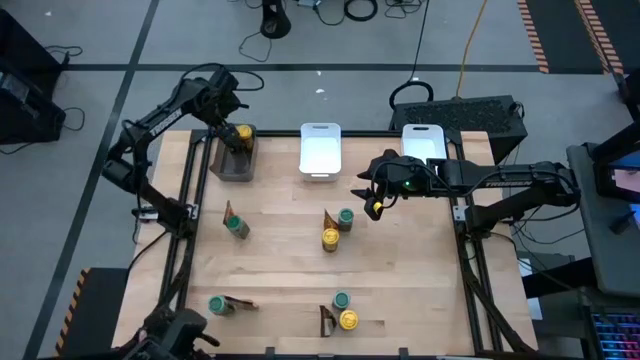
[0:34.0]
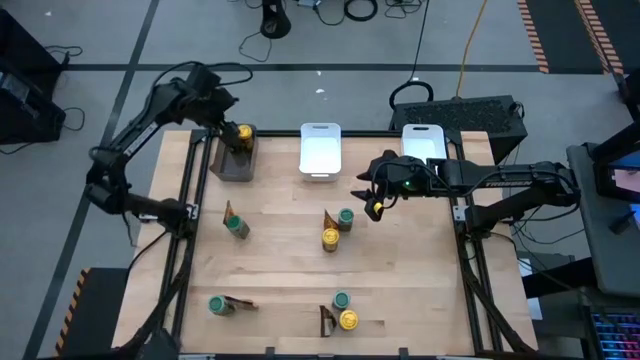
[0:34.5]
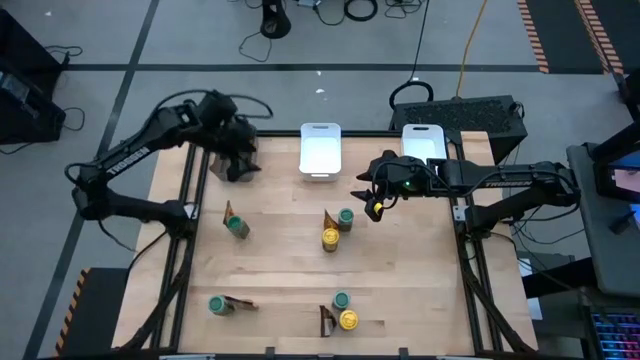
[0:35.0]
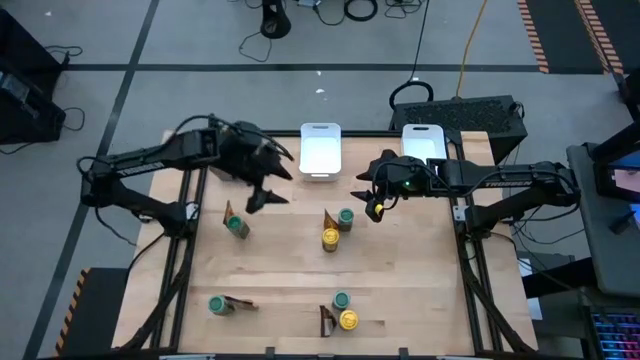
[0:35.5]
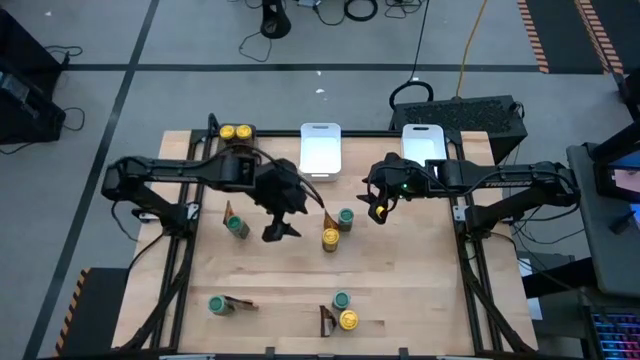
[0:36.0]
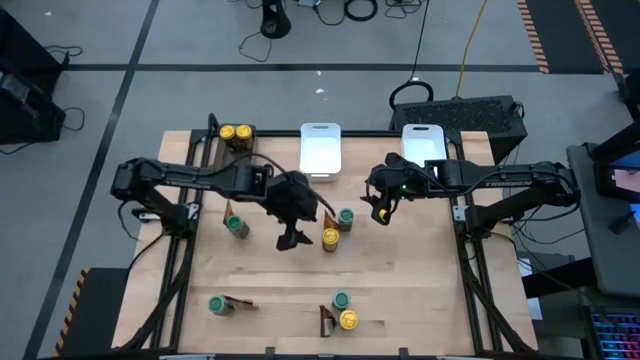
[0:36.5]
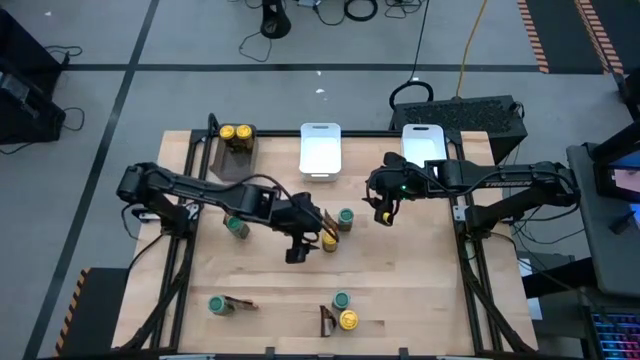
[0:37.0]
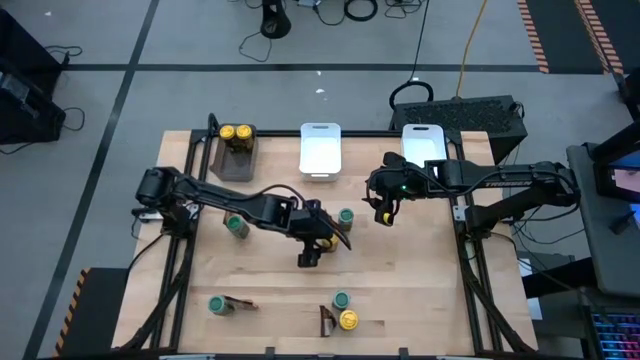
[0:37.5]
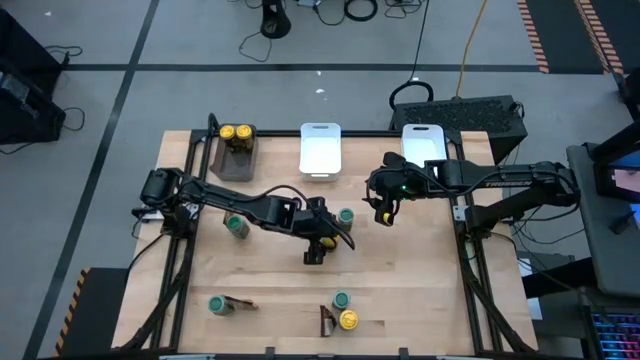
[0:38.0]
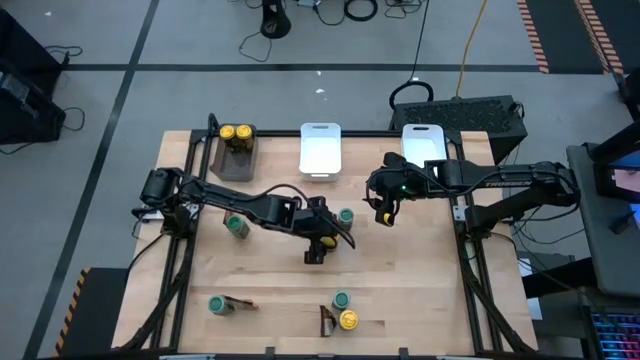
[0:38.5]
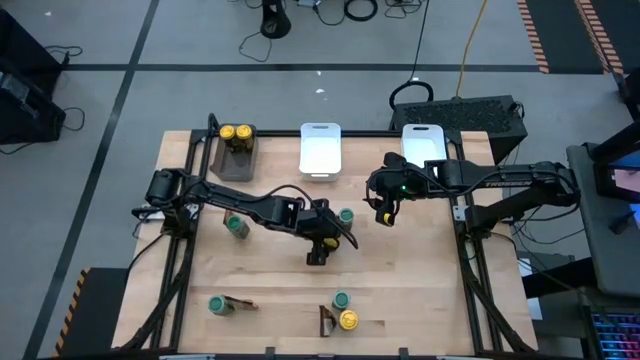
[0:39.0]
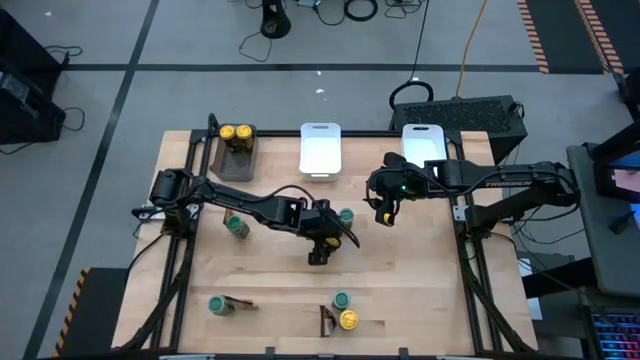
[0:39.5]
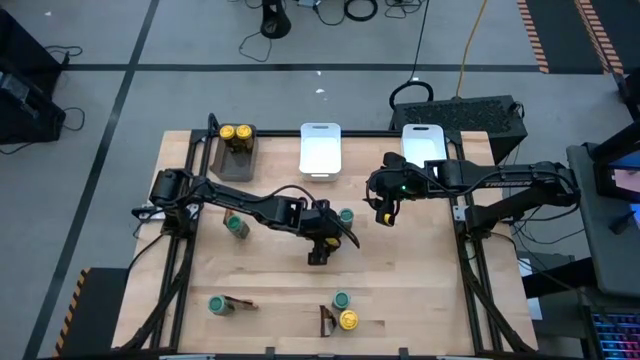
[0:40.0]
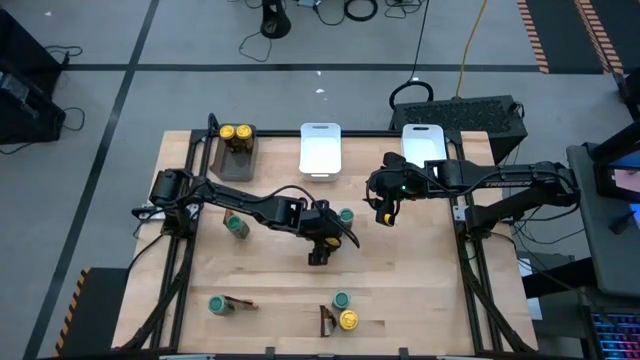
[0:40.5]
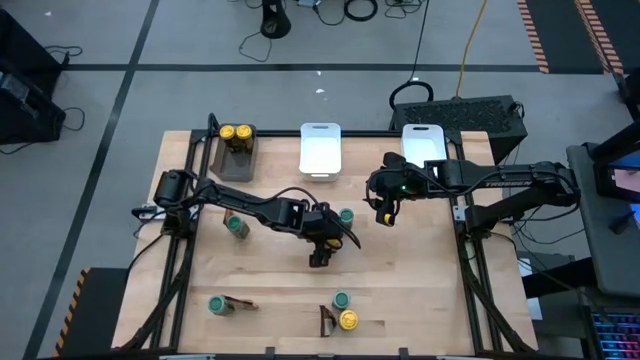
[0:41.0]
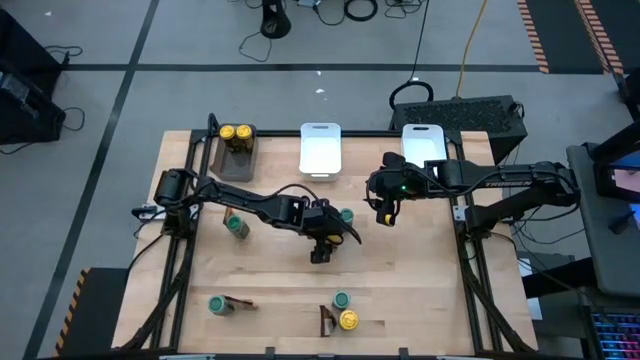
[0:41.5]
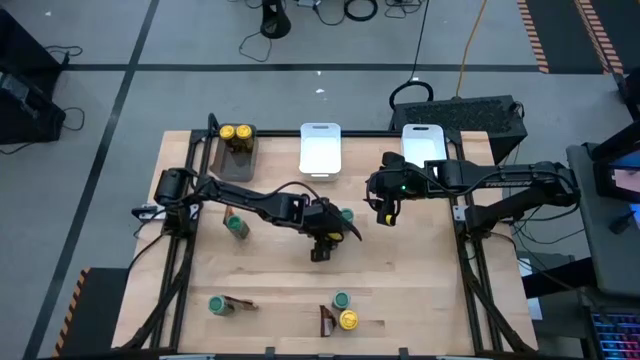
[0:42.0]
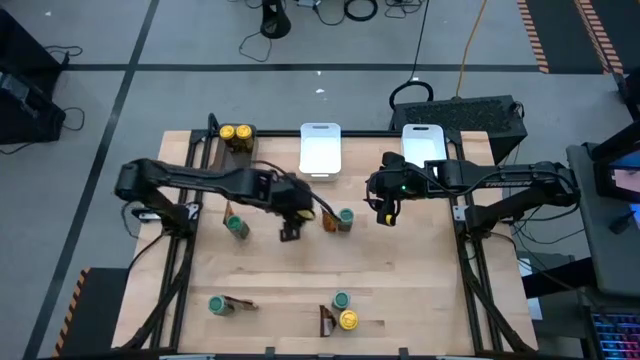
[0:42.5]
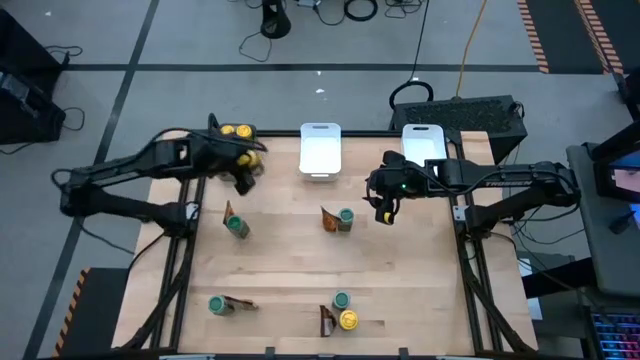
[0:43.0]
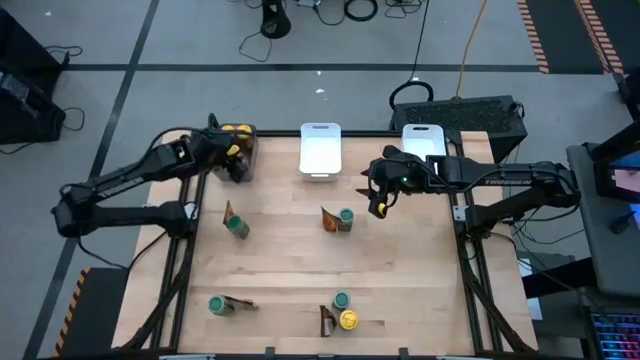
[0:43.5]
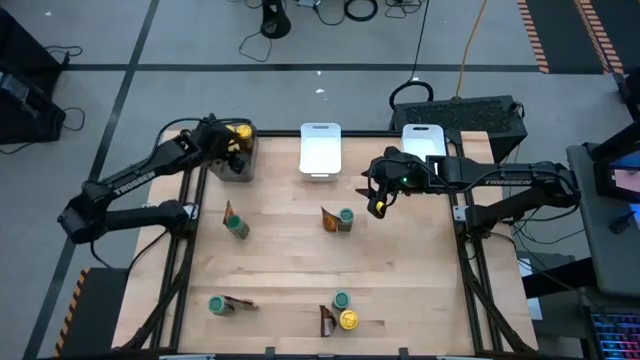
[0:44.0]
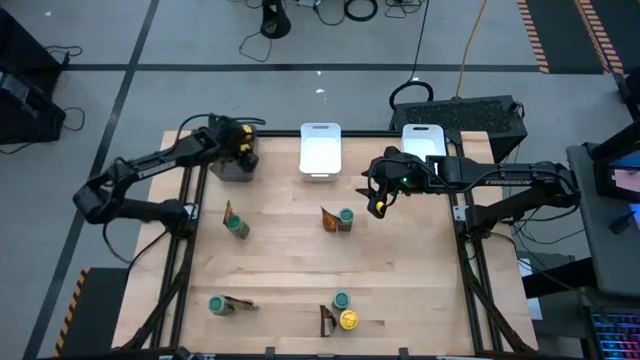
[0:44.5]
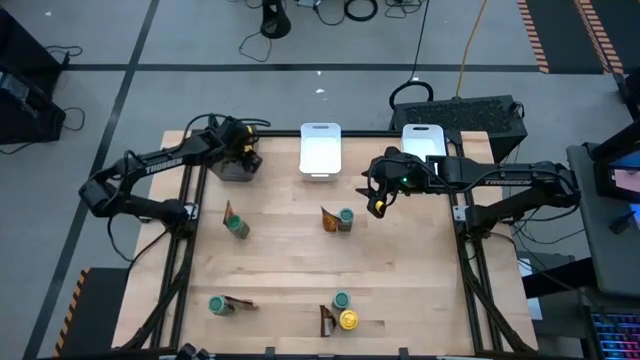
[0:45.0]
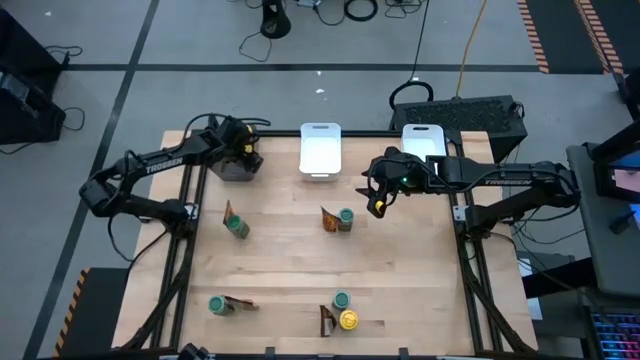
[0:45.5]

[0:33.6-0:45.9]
Task: Sort spices by type
Put the top yellow seasoning bottle into the black bin

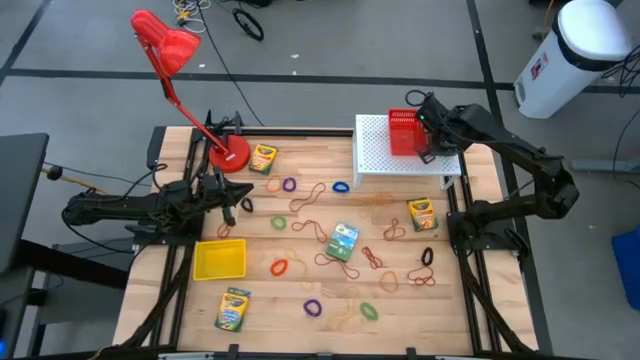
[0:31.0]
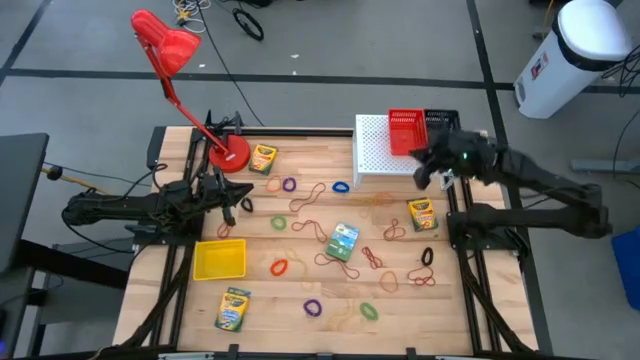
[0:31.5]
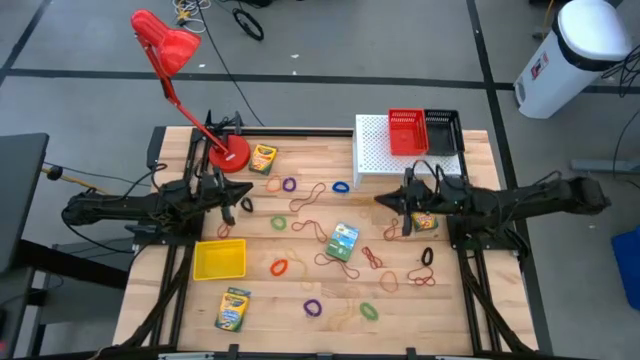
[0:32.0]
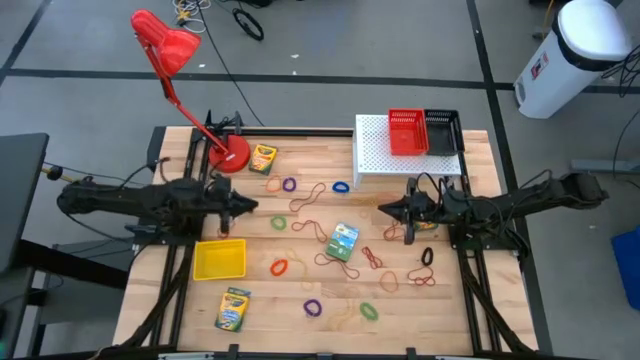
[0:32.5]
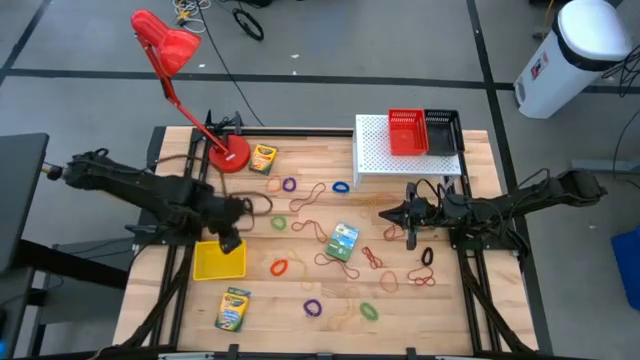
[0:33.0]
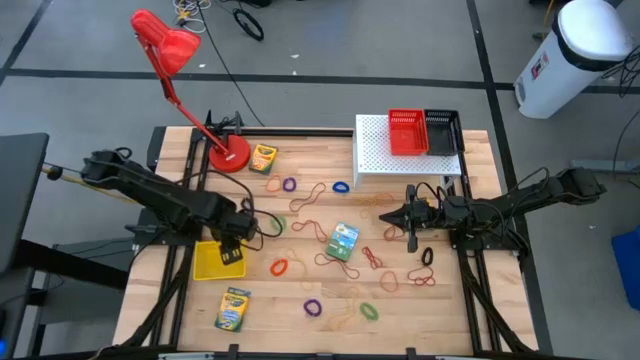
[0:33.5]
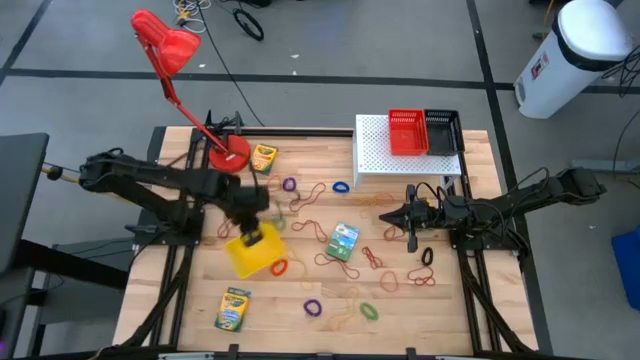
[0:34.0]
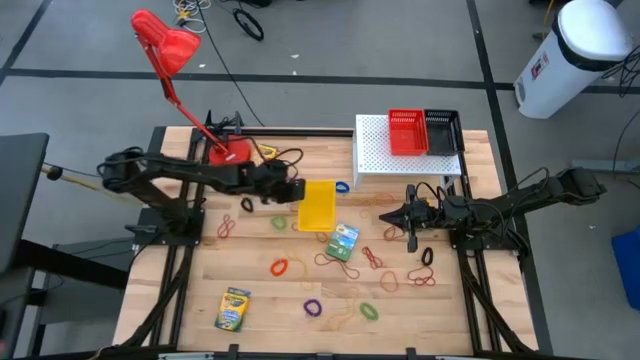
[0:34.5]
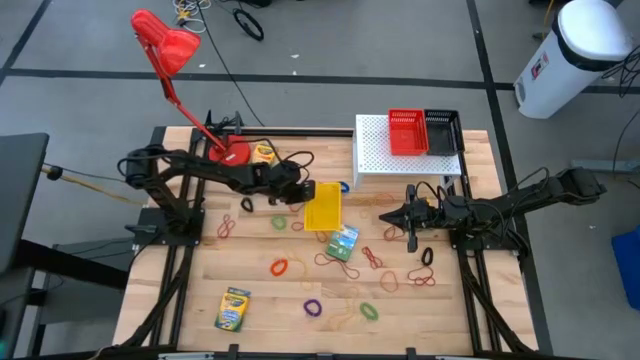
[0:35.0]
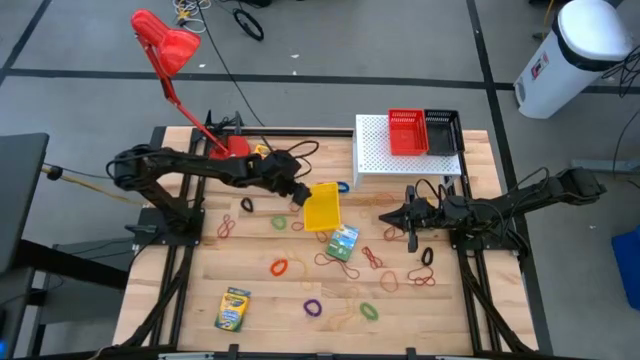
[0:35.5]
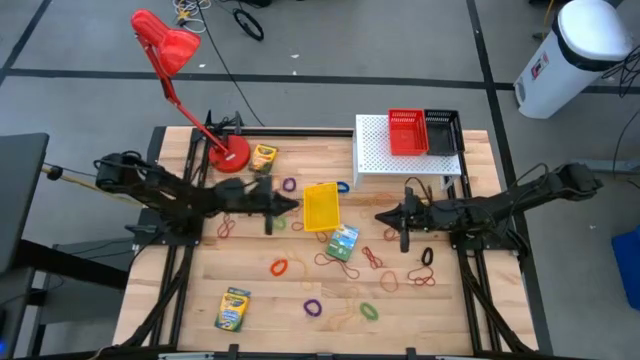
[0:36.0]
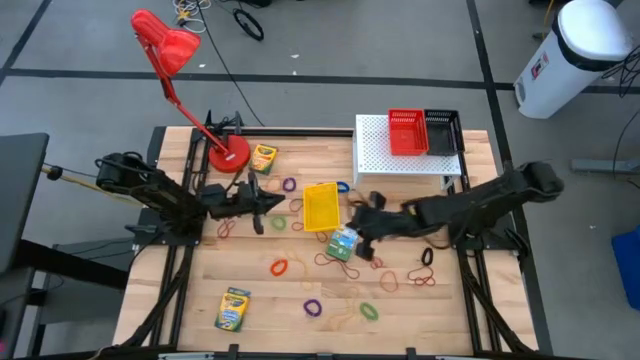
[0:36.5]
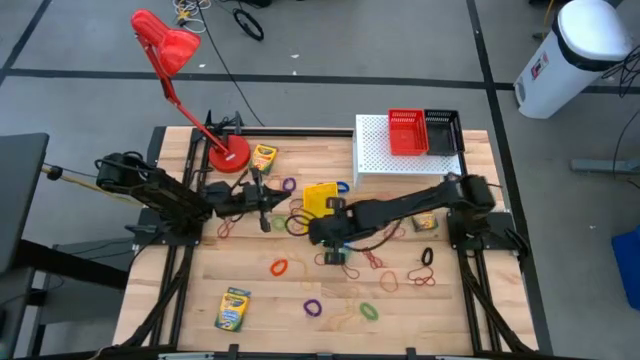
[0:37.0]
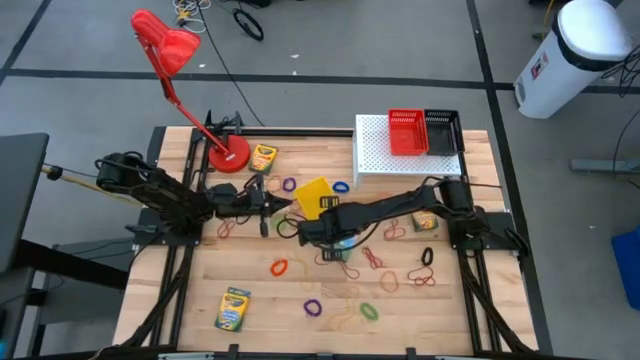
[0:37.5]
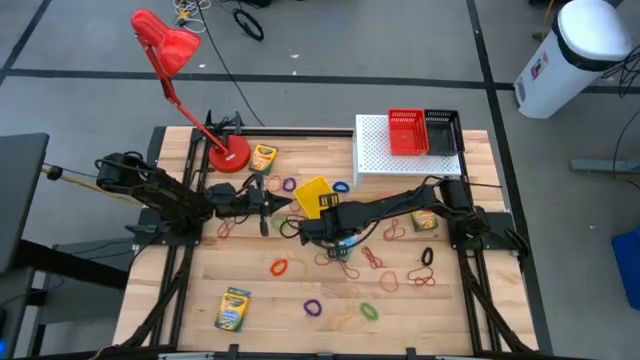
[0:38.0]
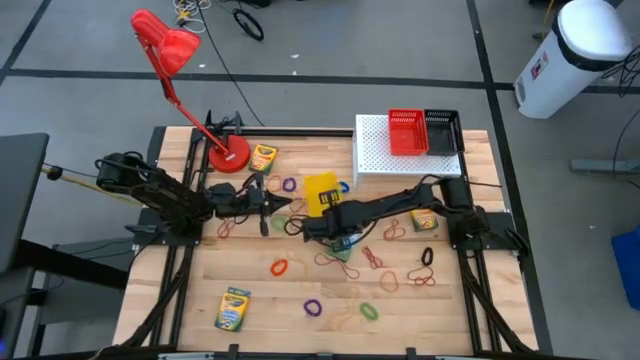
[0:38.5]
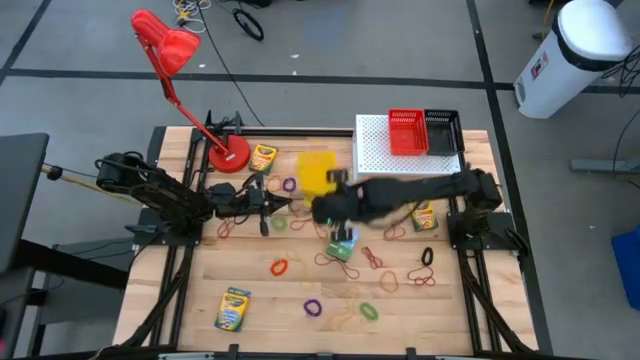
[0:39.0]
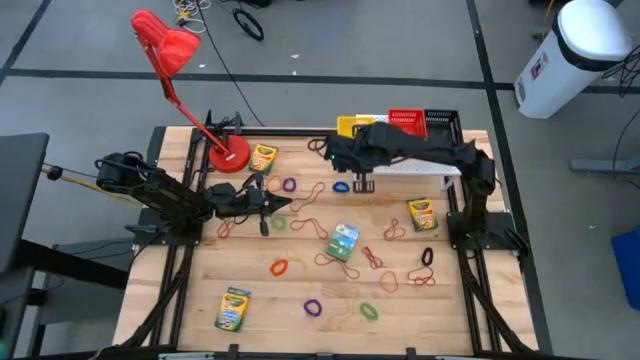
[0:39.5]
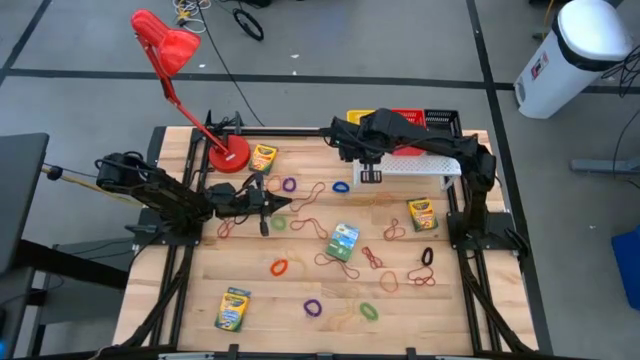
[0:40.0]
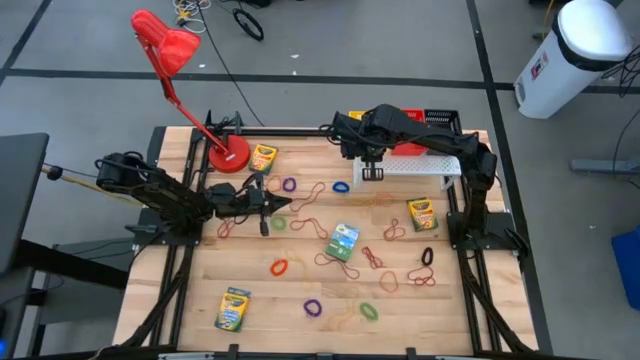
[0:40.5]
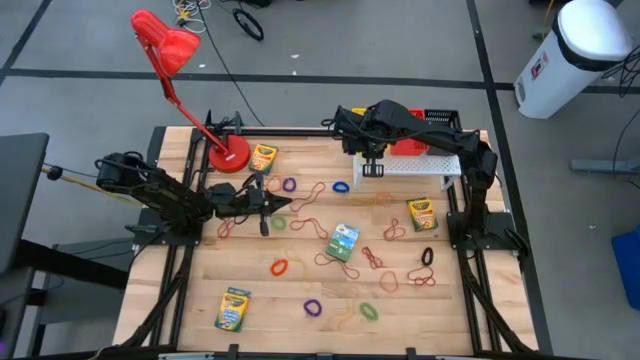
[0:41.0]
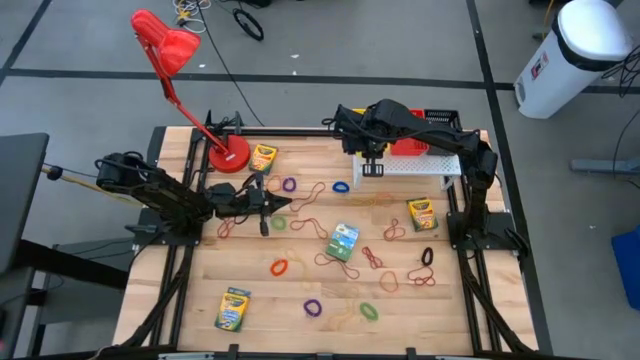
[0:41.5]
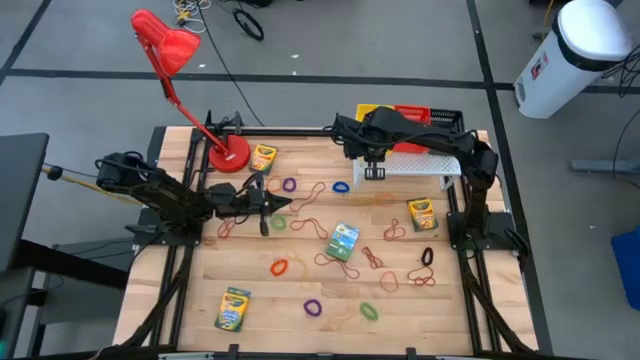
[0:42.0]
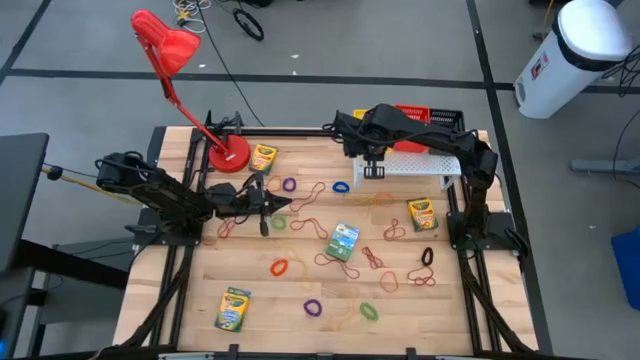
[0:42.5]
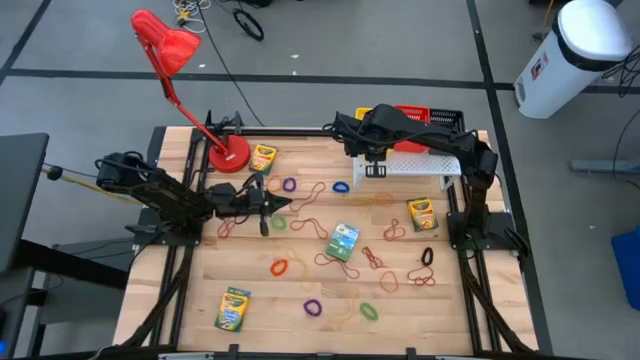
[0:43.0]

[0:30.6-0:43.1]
Task: Pick & Place Office Desk Supplies
Put the yellow basket on the shelf
